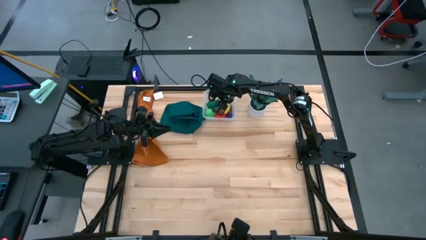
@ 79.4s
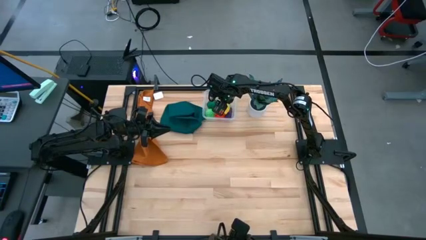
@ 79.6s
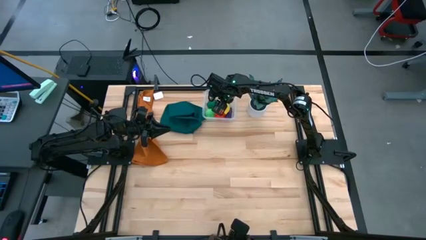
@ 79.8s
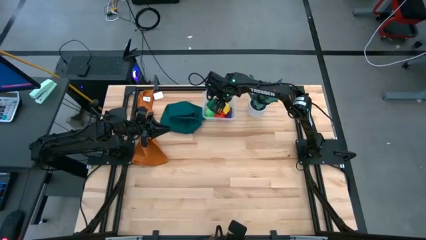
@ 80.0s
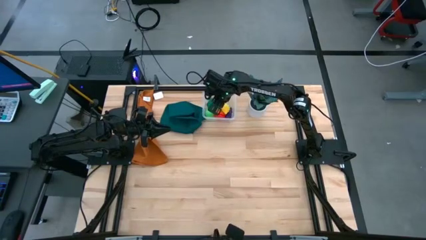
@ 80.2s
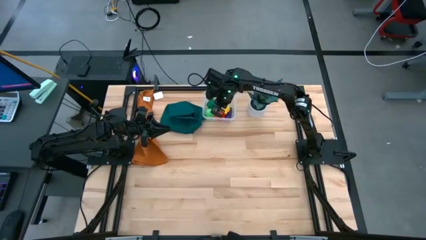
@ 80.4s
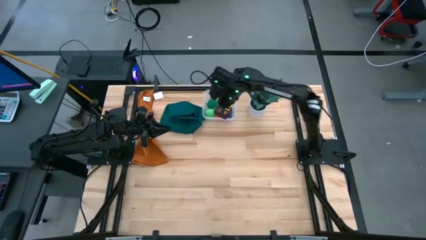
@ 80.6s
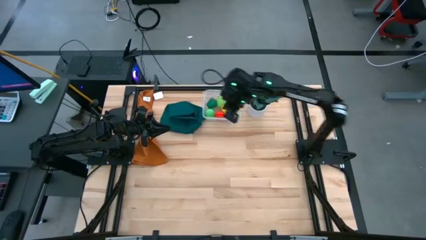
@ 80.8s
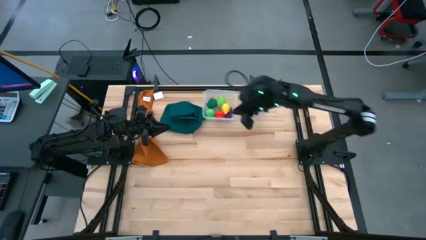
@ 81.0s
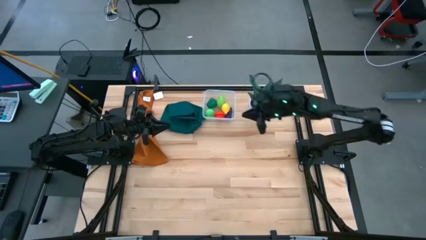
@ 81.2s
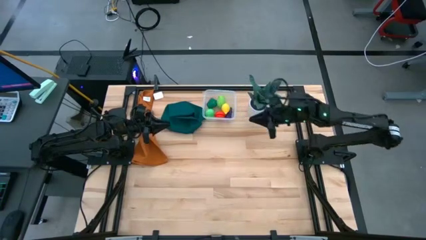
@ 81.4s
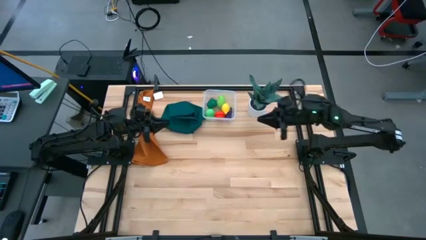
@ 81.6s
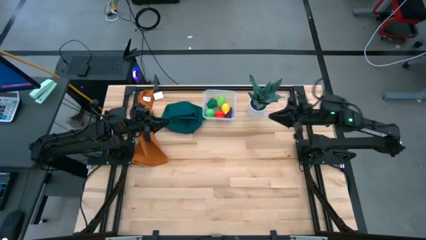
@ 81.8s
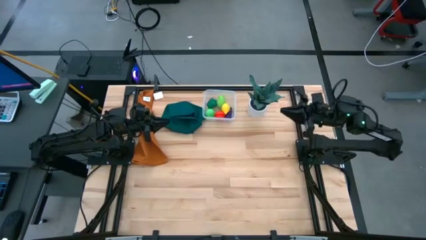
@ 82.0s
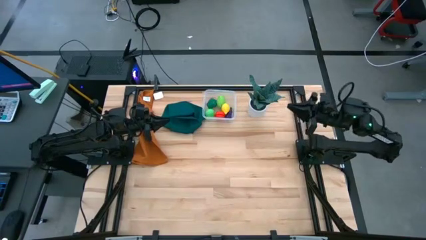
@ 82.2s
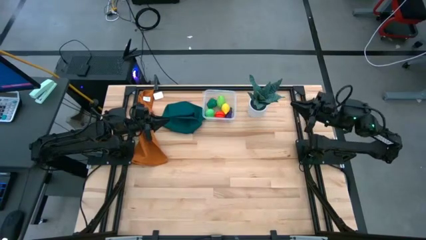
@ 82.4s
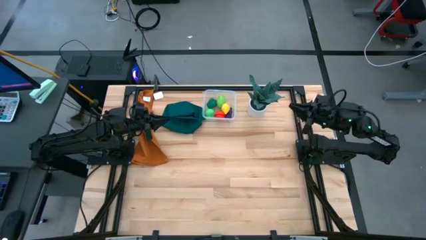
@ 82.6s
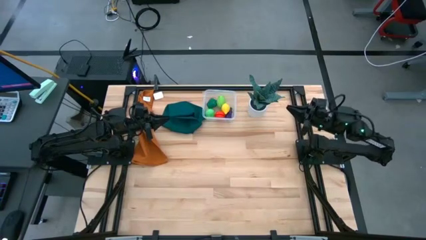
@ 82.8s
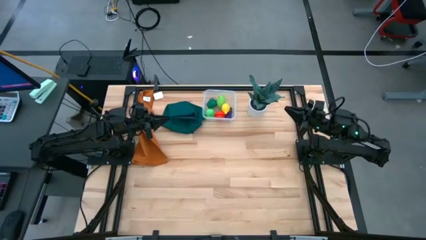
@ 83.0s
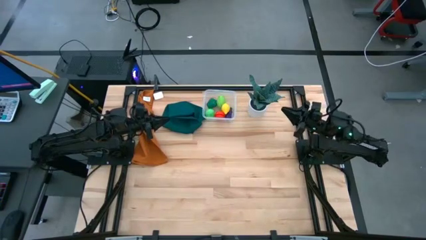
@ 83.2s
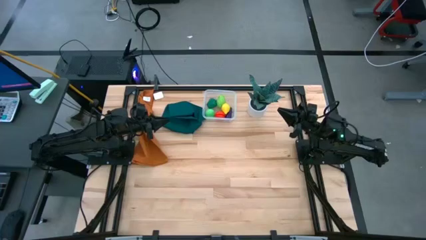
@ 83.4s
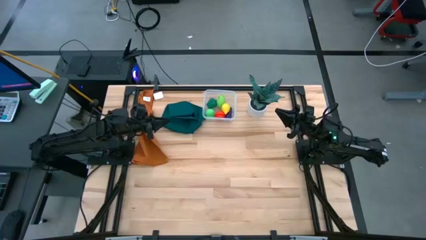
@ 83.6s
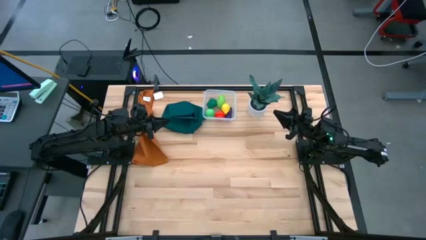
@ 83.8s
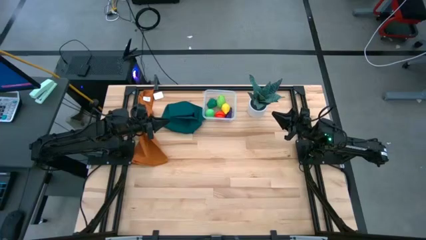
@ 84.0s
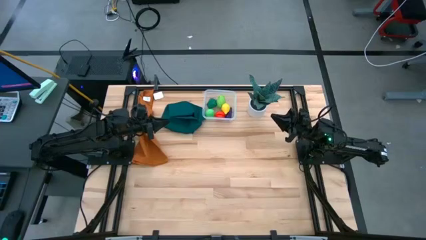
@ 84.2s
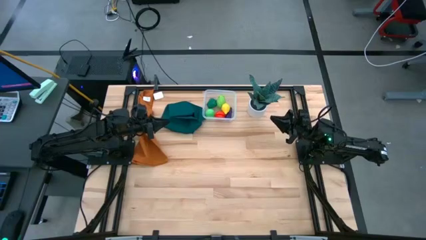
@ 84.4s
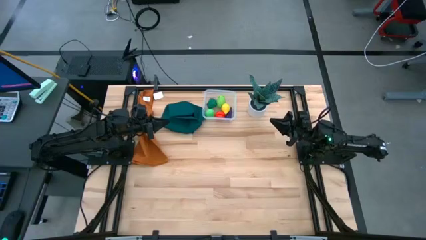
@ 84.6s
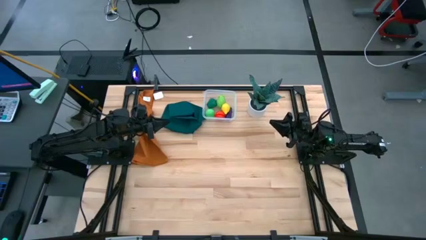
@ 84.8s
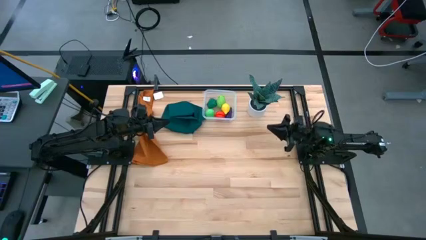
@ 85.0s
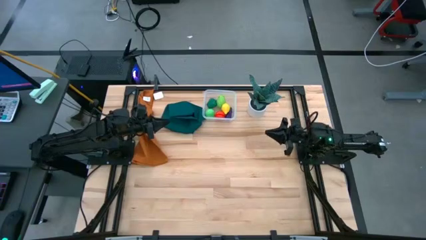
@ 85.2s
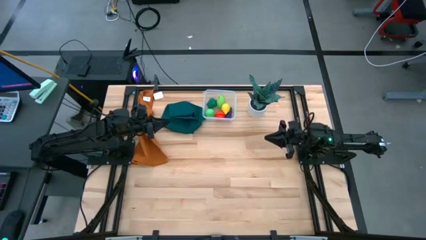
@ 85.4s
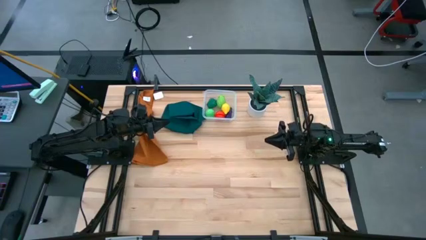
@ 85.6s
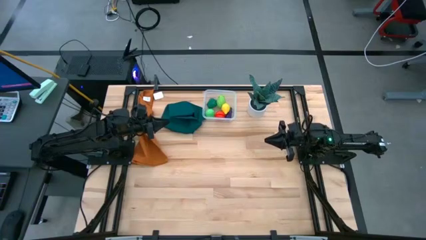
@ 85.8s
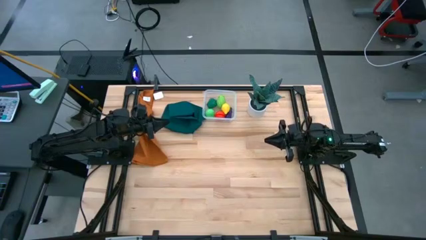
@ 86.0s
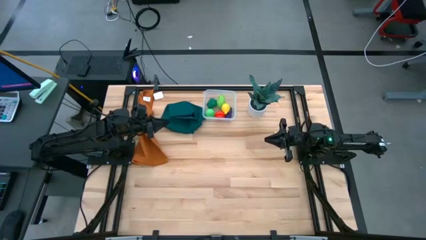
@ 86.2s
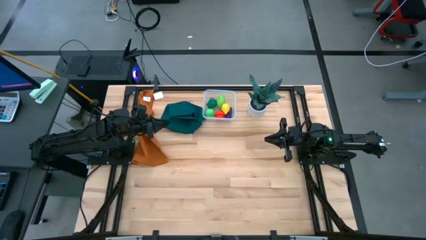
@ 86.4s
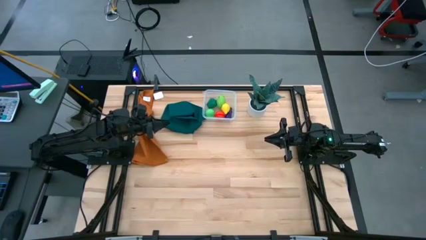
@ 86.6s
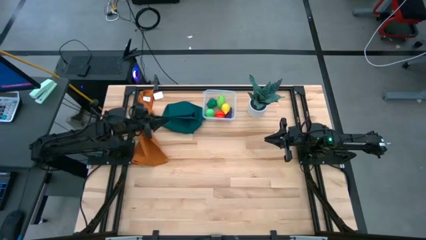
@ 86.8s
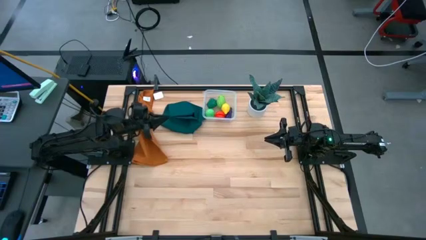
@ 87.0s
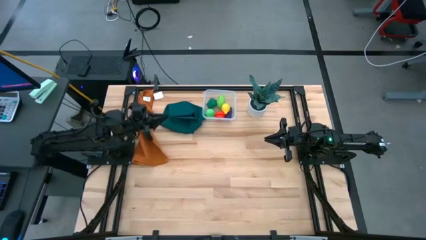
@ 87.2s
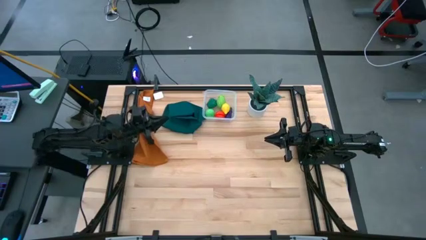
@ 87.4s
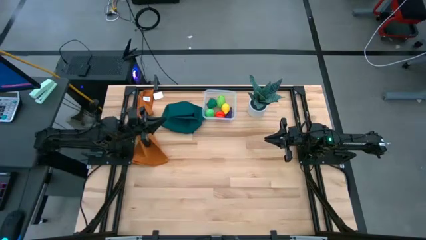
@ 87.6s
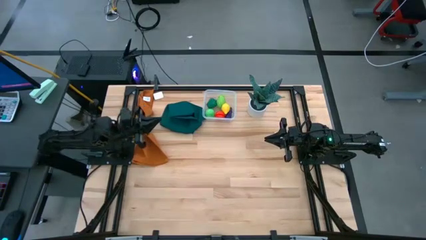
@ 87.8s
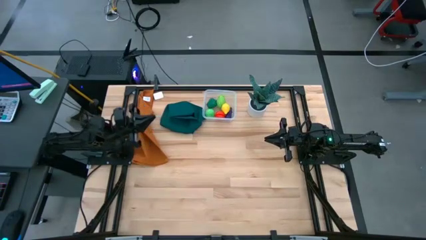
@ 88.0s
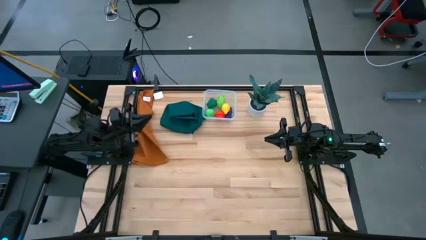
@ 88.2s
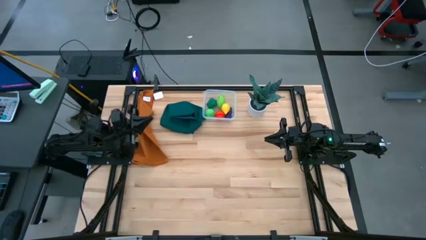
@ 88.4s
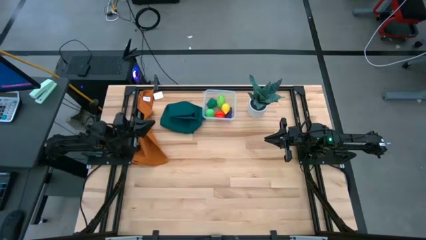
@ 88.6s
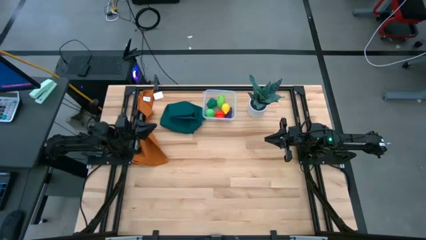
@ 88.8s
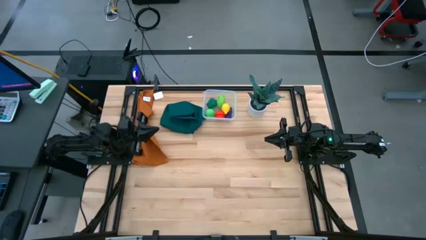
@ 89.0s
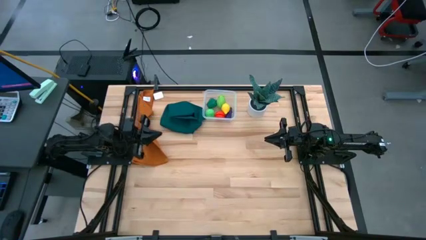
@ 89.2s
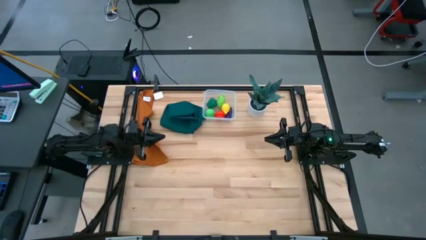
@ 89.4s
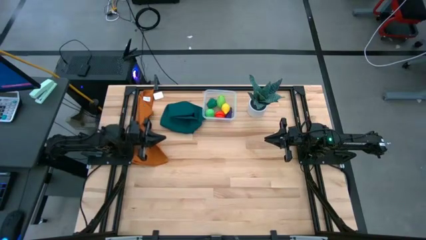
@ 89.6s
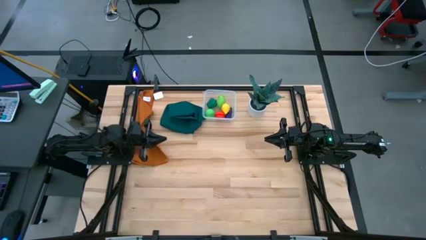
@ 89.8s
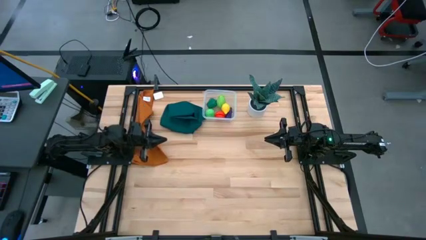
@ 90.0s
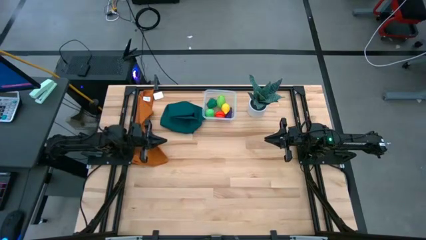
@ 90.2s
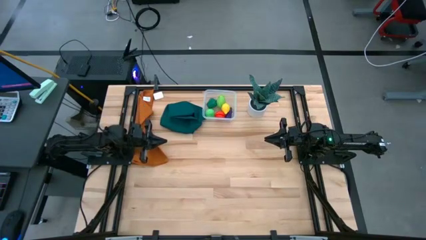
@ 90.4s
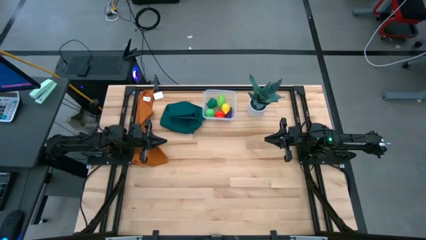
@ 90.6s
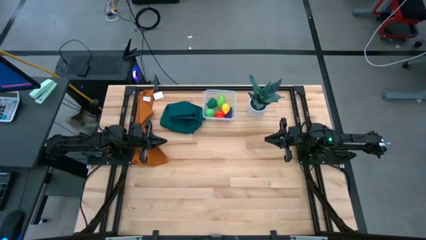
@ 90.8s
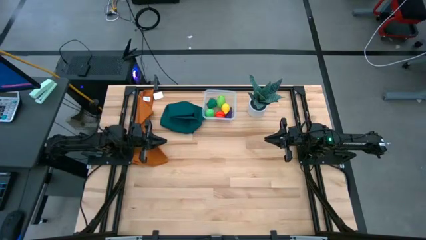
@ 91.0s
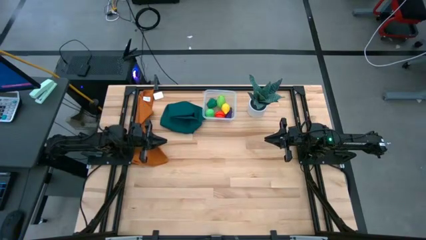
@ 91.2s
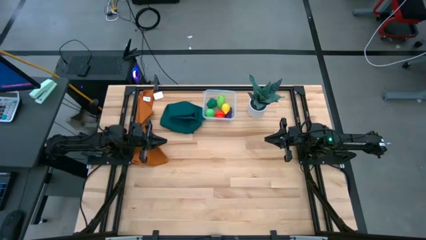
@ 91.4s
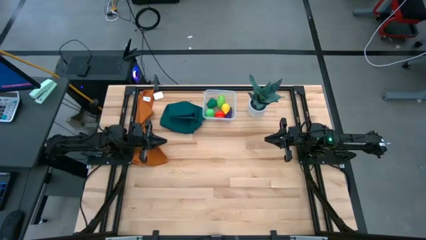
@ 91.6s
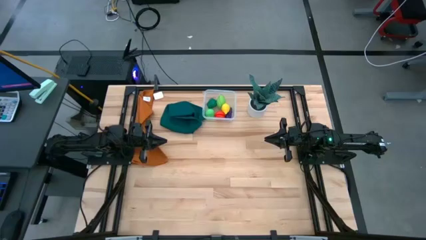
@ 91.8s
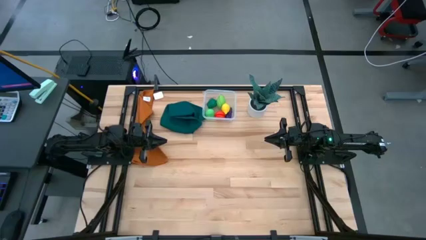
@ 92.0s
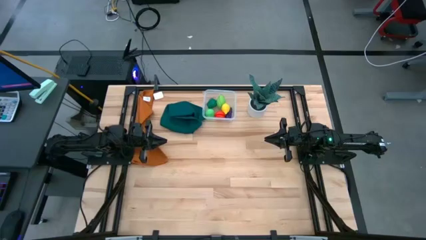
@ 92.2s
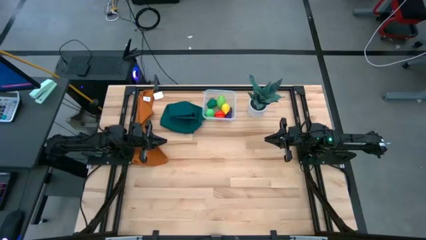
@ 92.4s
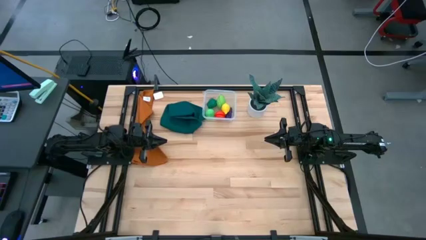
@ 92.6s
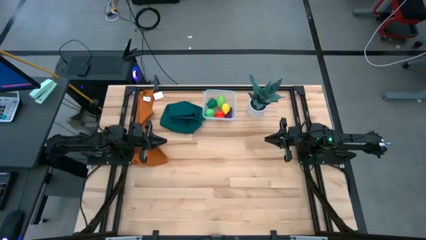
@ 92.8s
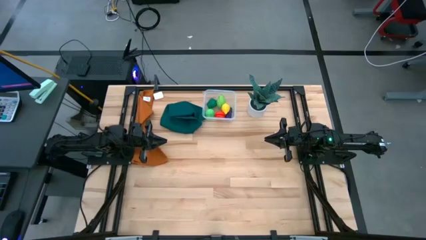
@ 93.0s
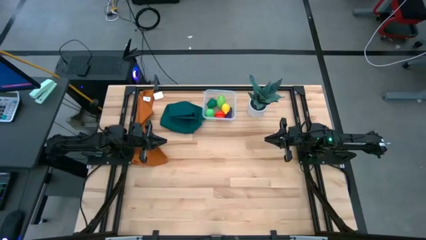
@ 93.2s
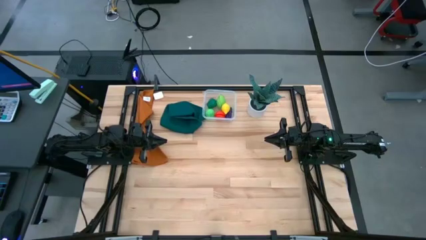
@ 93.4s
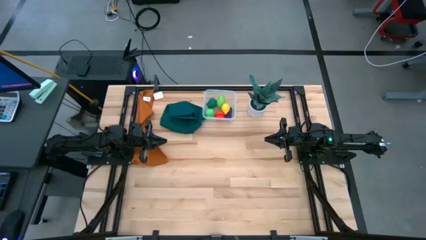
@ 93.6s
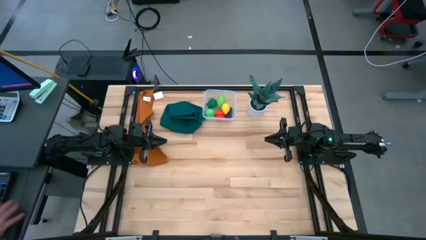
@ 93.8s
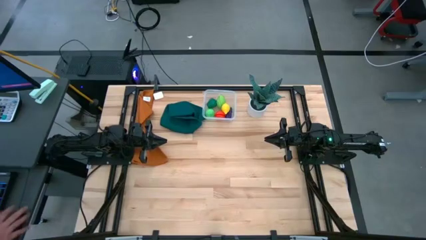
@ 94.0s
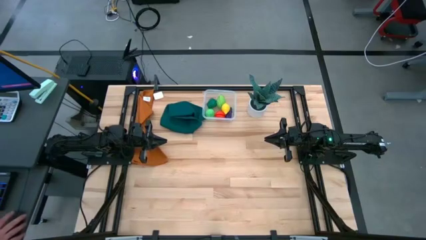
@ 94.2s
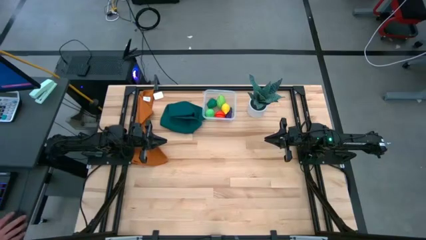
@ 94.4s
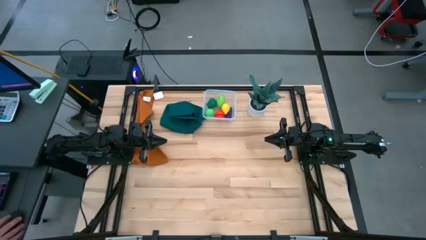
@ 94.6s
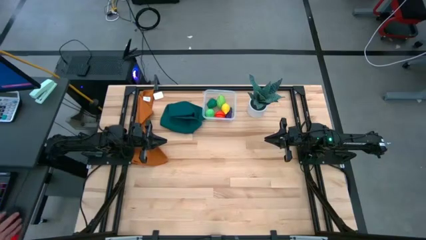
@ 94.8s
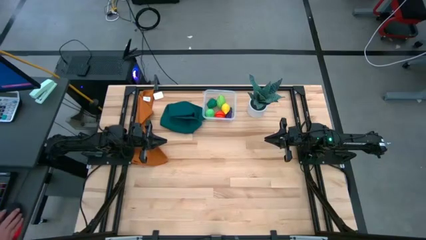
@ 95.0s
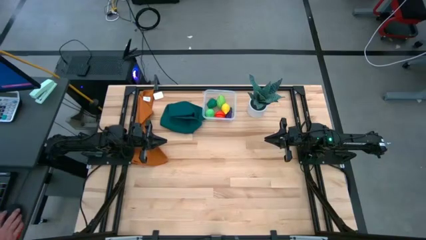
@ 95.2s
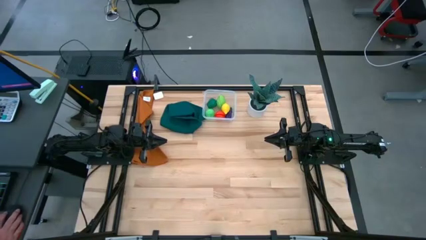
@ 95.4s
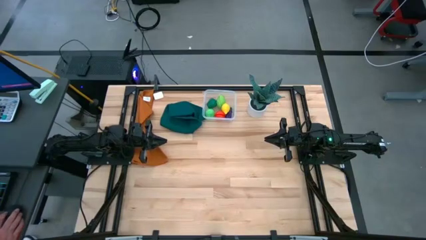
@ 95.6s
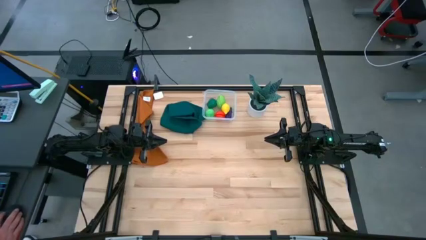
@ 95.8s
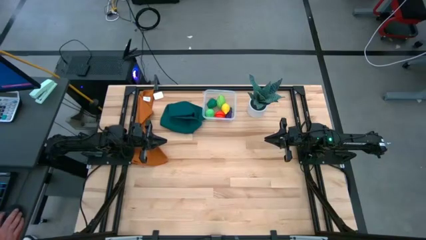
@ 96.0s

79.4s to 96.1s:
Task: Pick and placing Produce into tupperware
Return to Home Position
